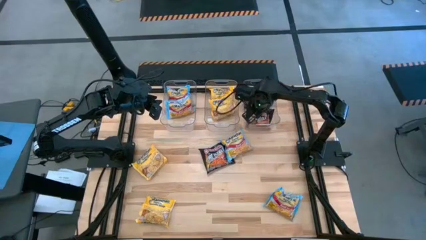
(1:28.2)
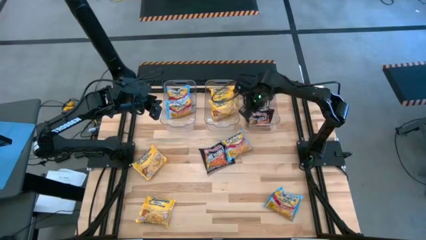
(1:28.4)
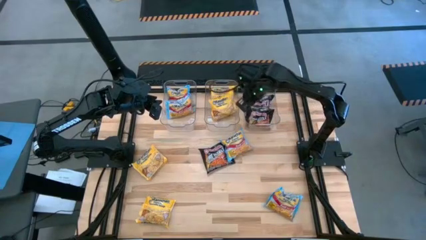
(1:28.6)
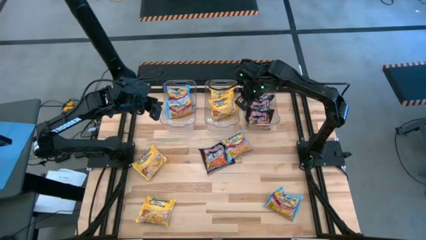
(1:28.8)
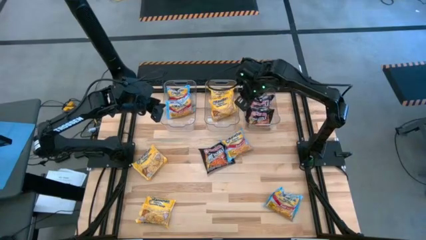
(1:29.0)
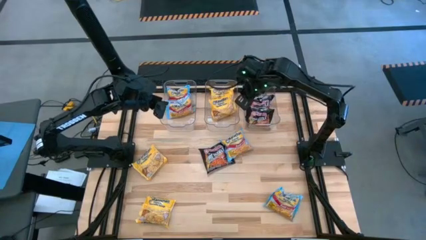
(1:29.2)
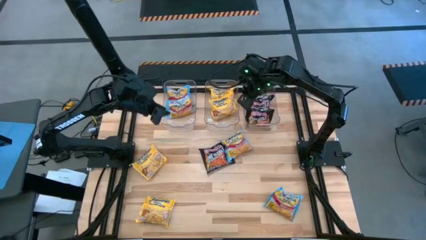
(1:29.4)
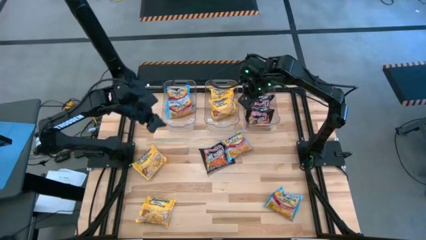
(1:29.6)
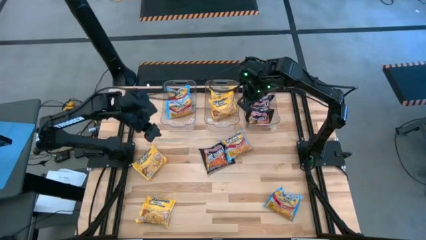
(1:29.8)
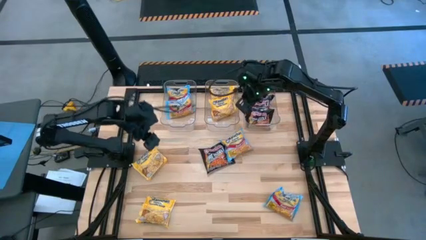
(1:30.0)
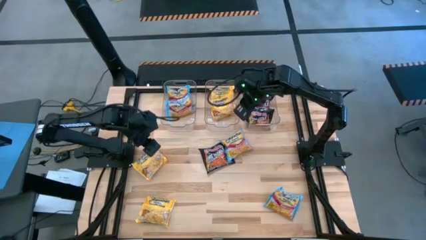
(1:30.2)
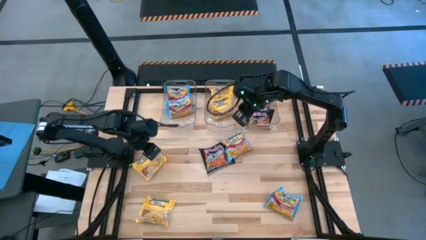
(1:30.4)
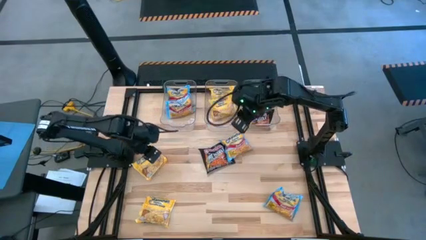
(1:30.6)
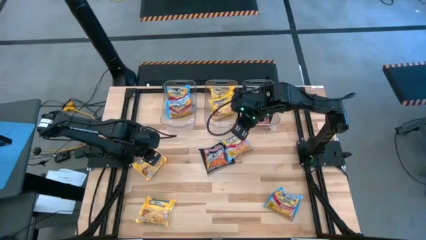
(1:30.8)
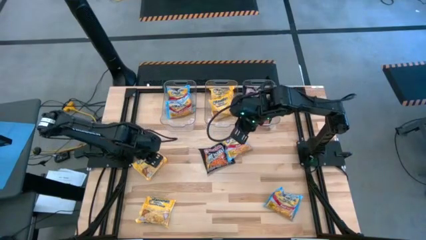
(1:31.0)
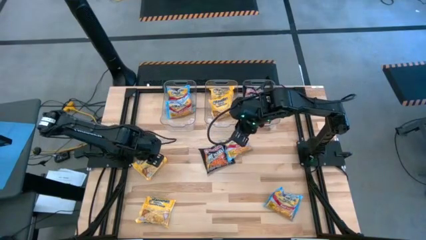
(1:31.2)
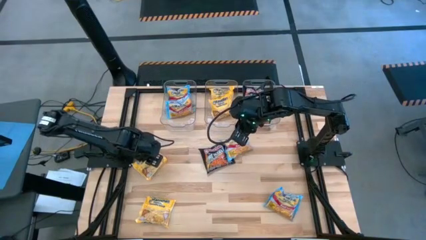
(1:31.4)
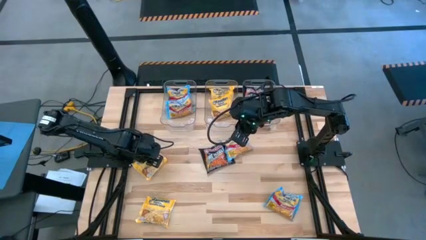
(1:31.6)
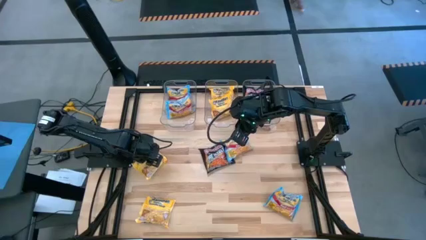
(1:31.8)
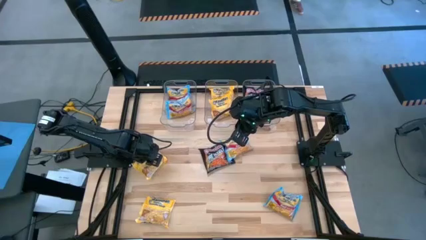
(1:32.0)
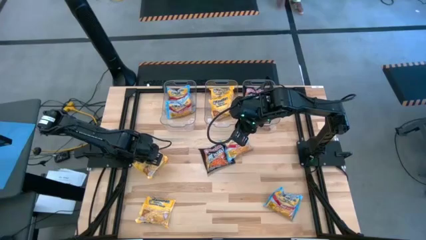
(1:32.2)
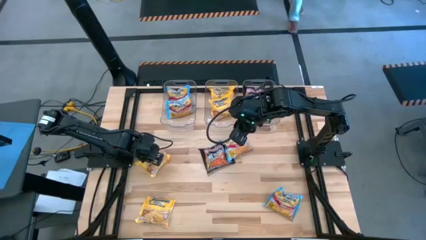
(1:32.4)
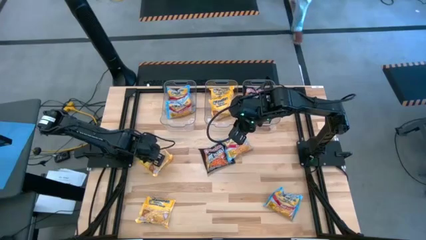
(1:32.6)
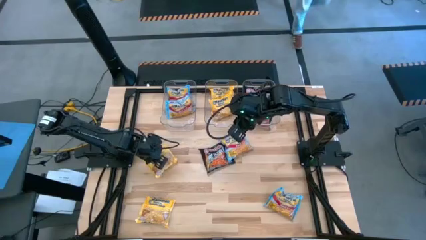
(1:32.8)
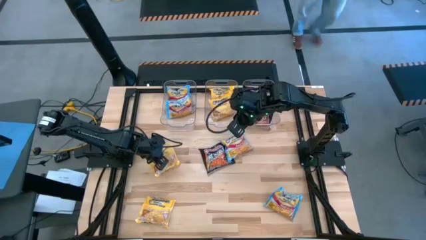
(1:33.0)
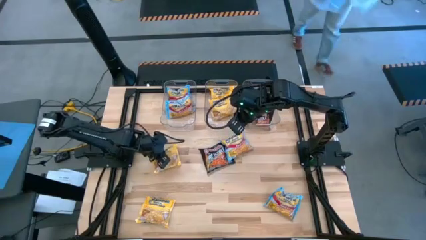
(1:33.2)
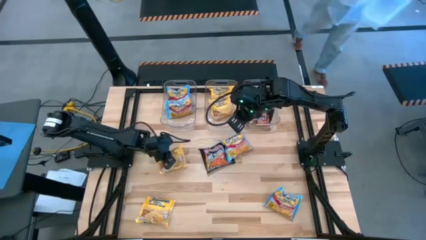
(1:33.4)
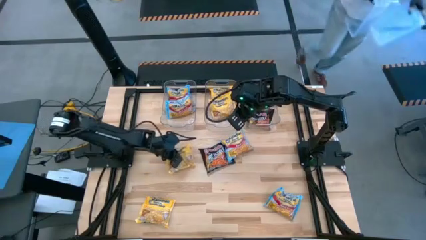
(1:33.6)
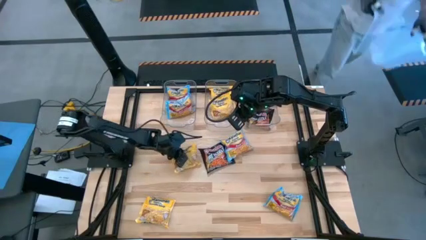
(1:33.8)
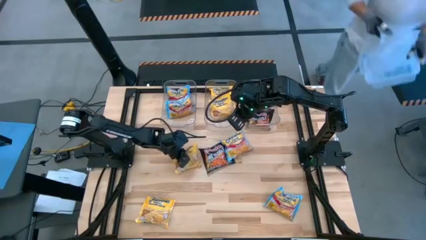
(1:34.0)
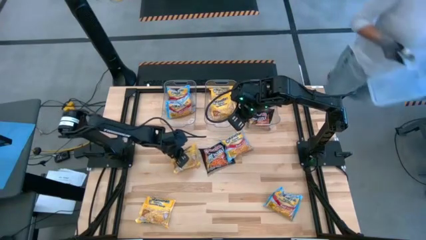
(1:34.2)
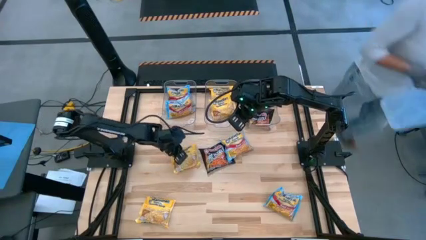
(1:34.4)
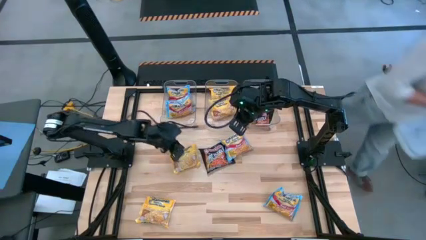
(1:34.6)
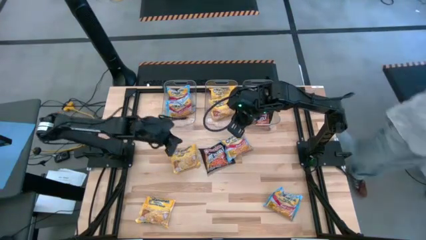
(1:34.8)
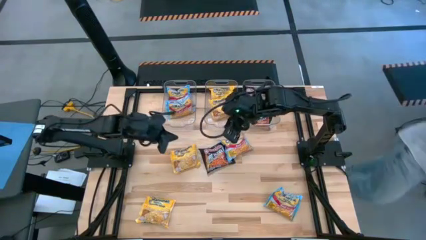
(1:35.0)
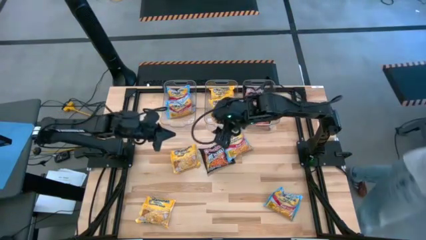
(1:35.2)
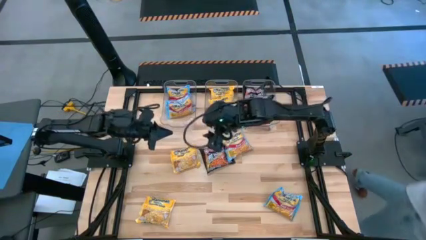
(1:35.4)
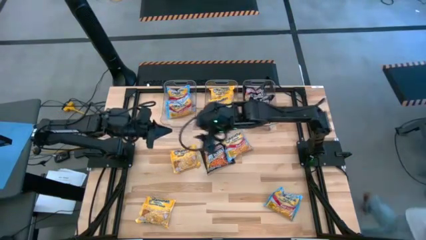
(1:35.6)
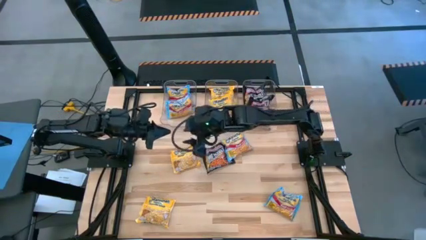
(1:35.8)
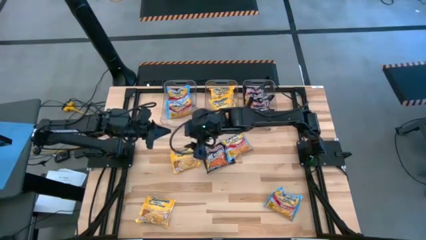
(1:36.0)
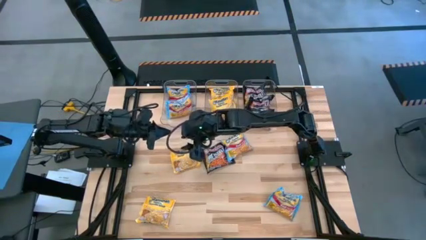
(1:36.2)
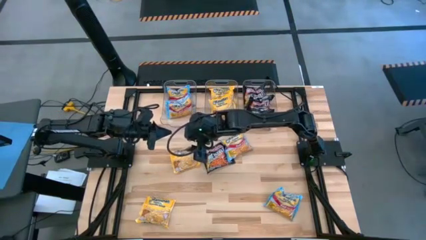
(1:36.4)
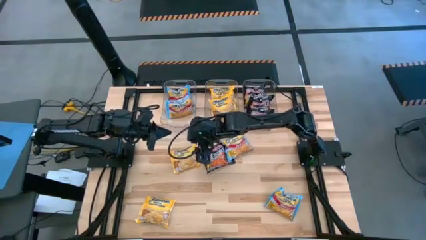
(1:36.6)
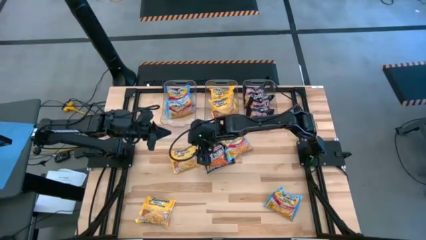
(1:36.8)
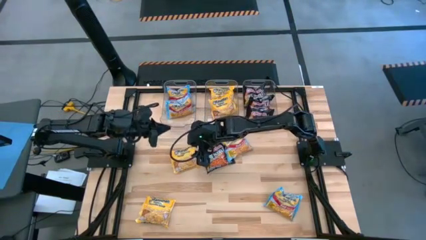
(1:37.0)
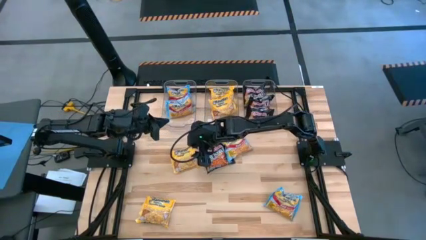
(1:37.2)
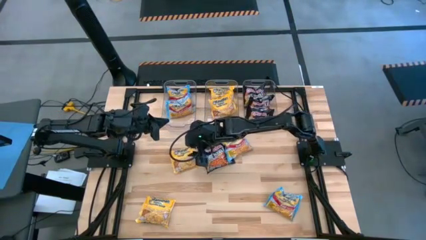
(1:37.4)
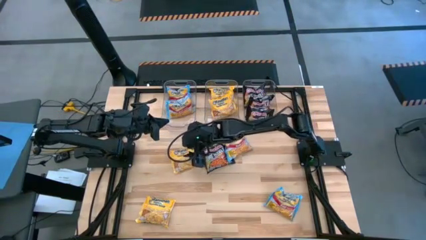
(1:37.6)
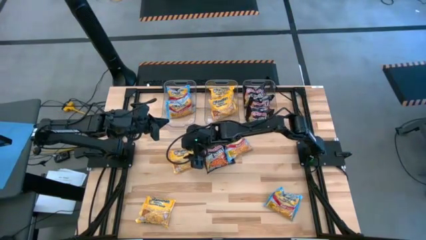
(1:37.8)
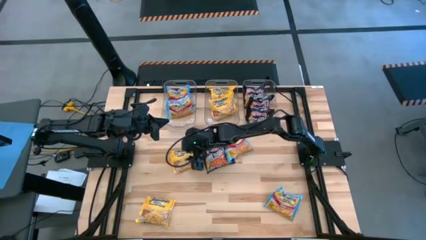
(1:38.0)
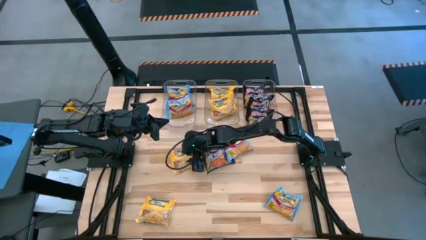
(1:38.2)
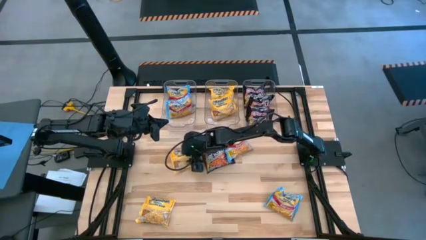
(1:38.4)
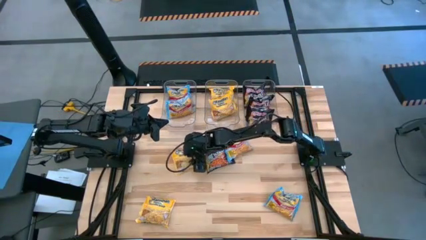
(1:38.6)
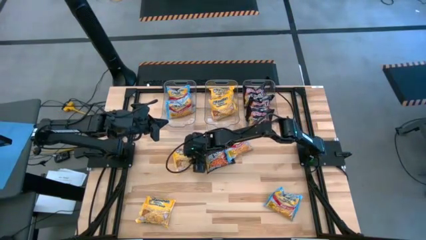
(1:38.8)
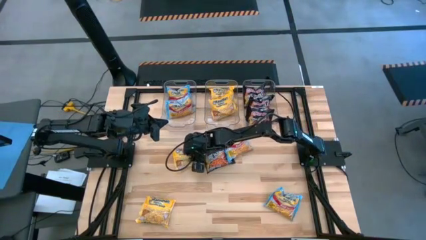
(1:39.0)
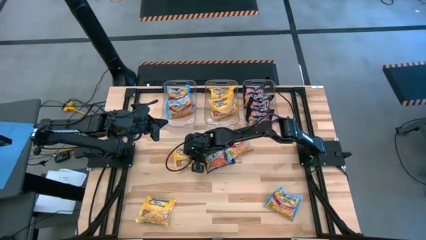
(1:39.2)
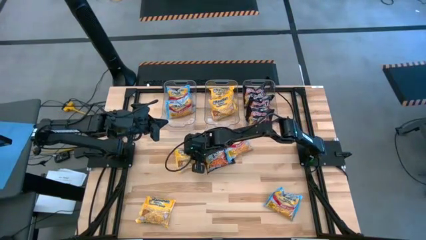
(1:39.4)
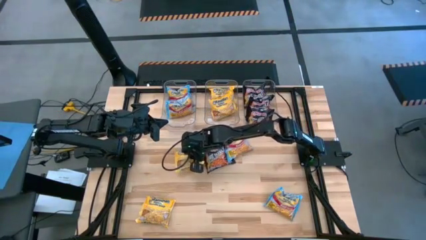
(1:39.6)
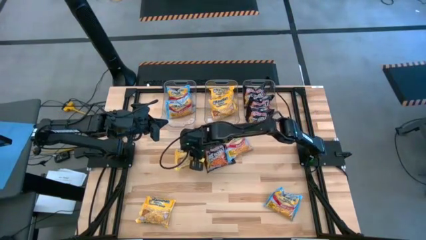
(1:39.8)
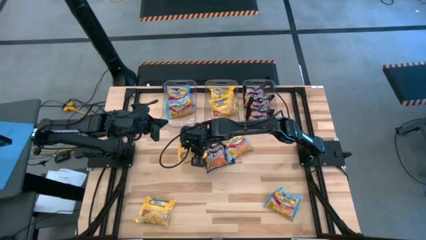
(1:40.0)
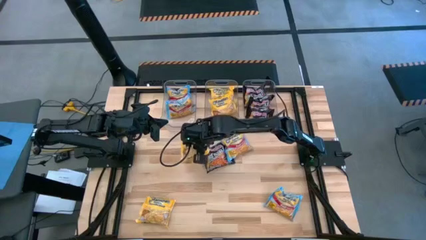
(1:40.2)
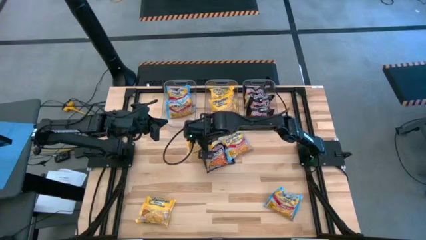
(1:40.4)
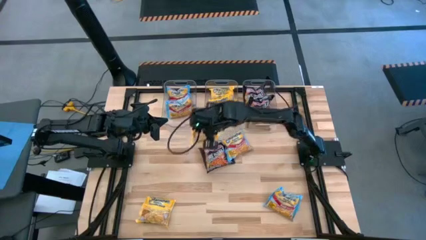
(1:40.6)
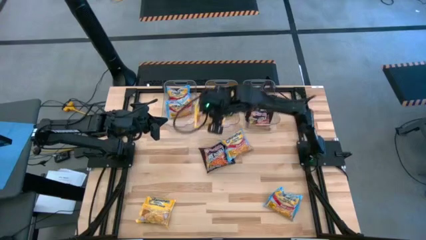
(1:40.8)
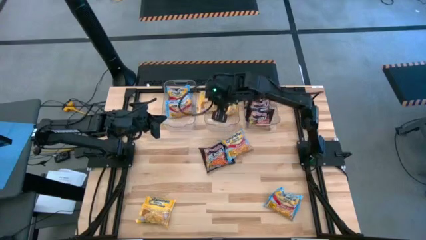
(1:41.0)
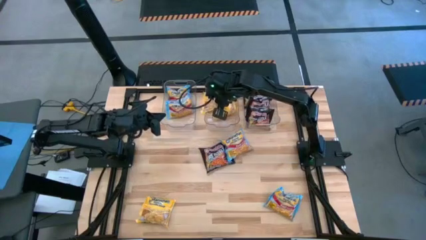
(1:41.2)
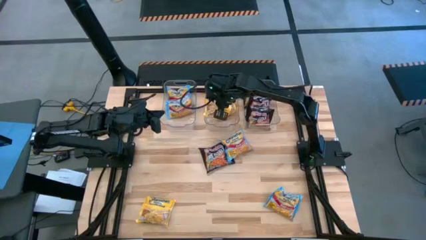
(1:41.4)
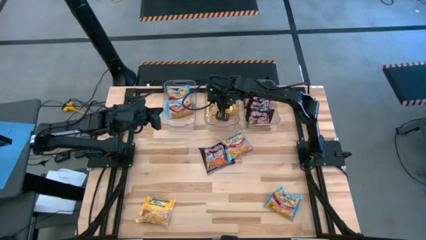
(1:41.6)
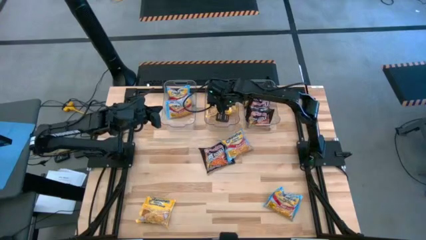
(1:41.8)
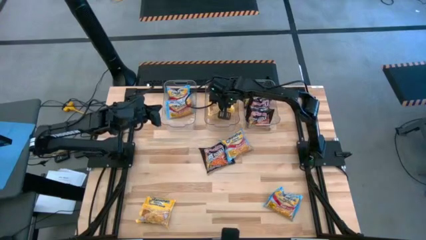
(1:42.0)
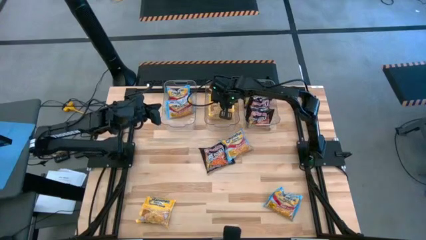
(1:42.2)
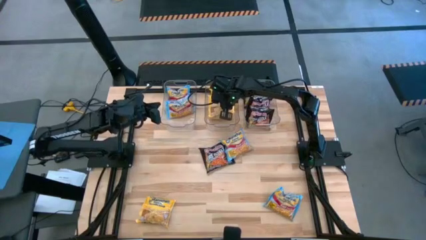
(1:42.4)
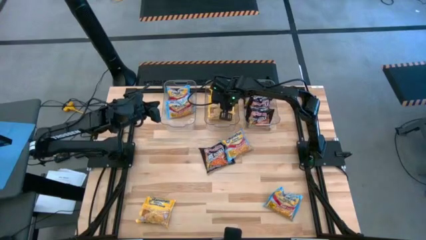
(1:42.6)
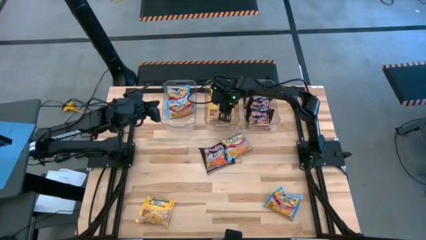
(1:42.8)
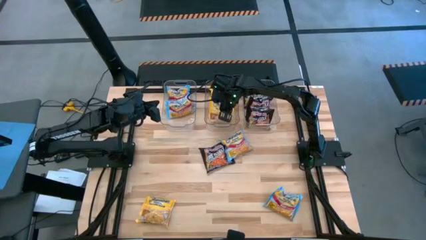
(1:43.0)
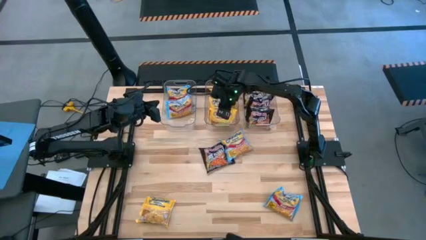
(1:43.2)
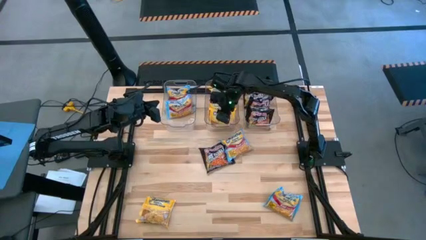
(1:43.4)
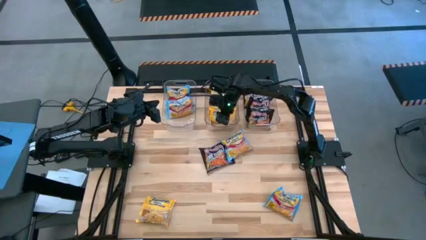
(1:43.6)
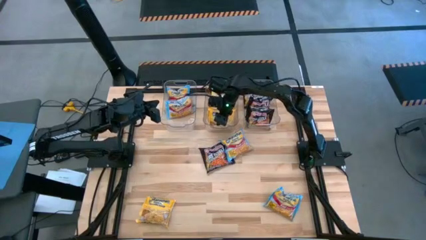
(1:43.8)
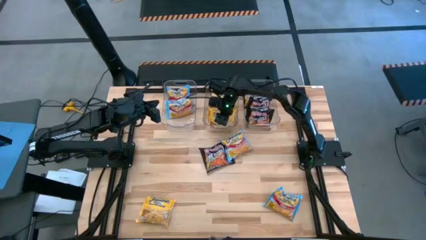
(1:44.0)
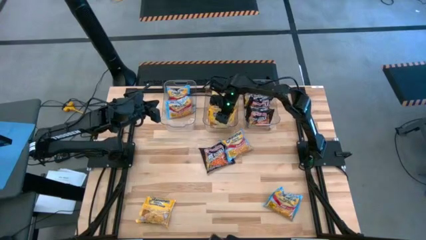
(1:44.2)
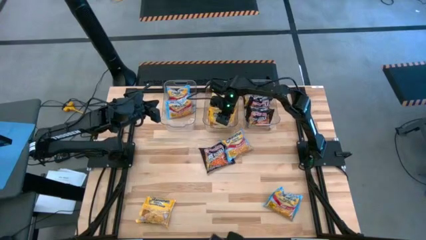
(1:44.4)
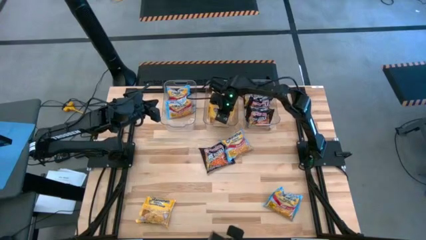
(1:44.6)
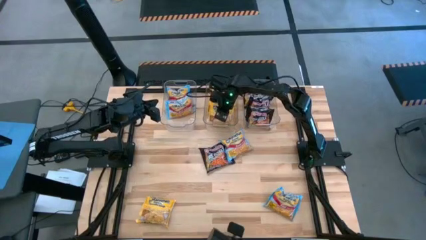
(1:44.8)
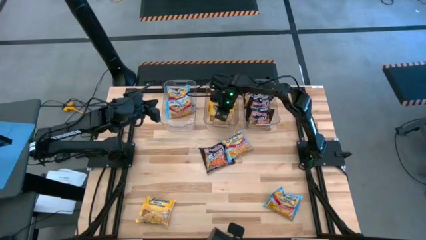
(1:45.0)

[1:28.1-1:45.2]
Task: Sort Maruchan noodles
Put the yellow noodle pack into the middle transparent bin
